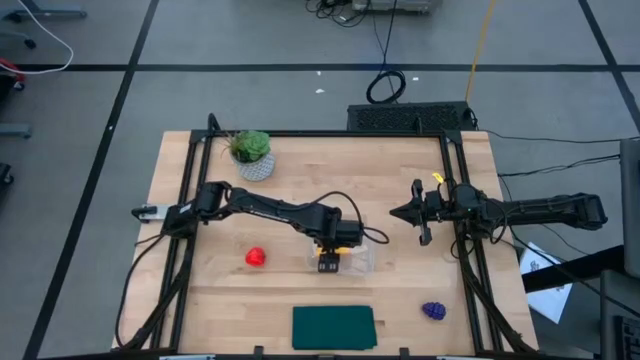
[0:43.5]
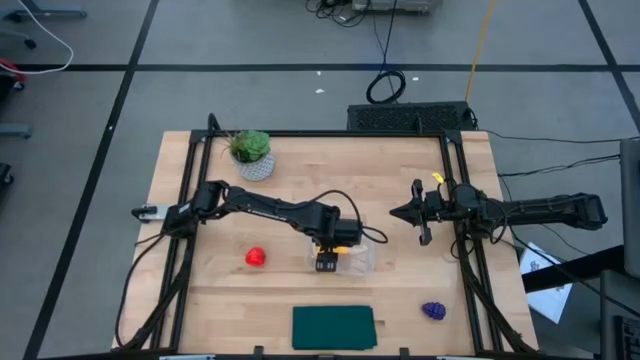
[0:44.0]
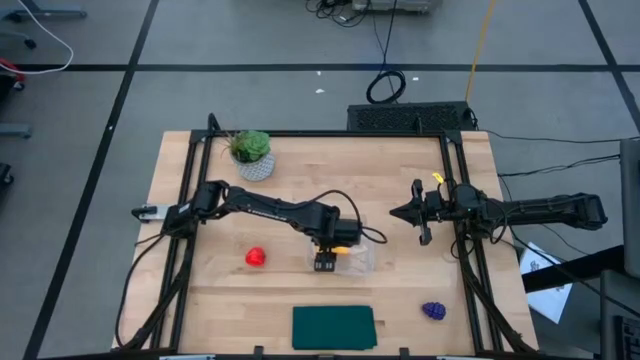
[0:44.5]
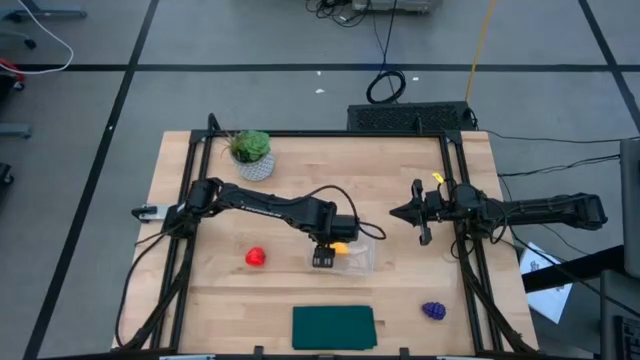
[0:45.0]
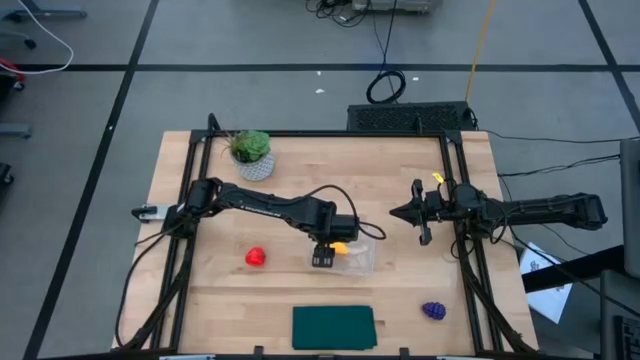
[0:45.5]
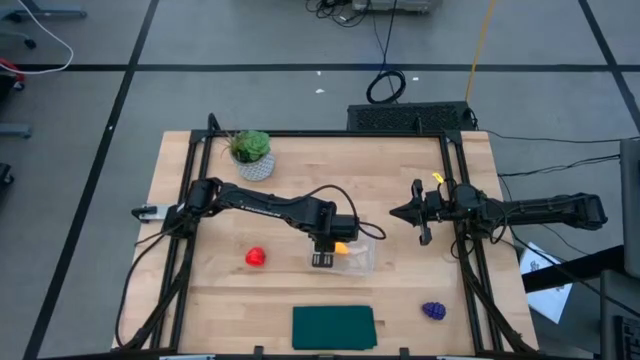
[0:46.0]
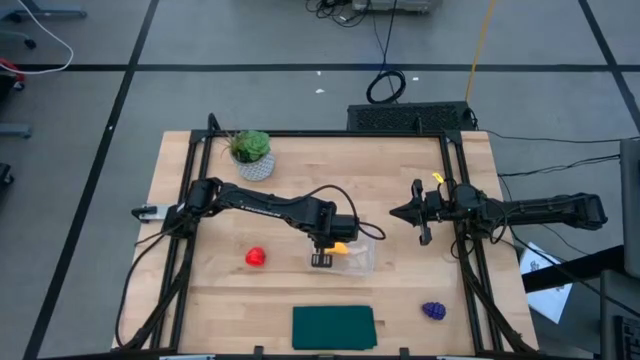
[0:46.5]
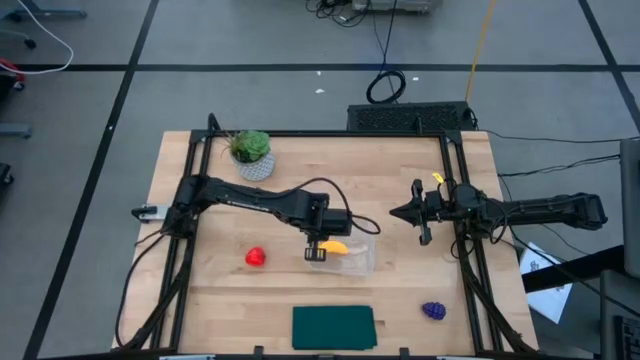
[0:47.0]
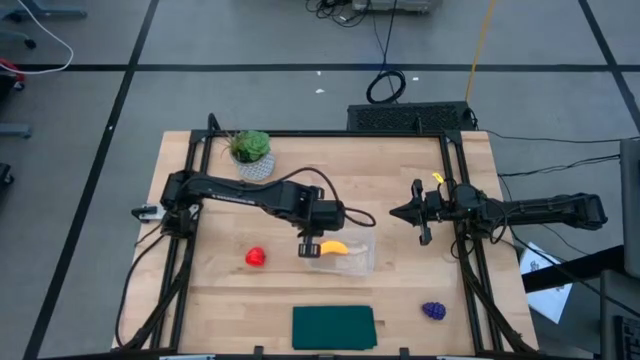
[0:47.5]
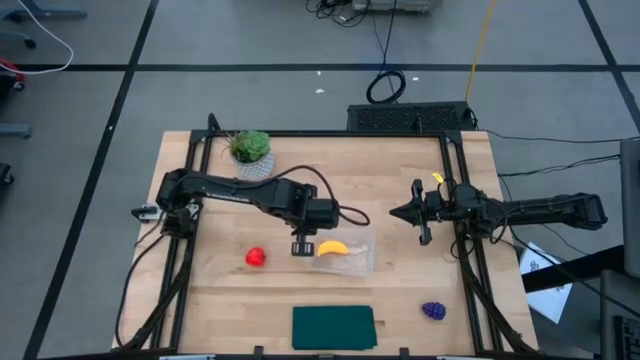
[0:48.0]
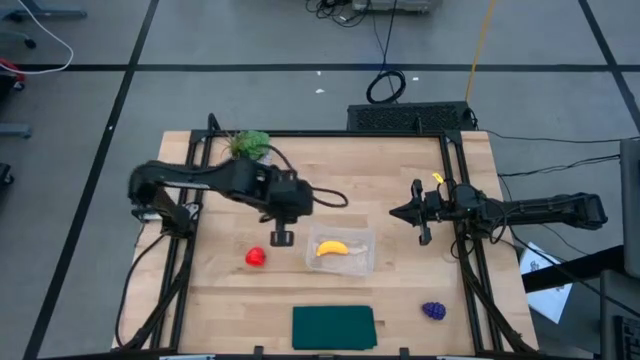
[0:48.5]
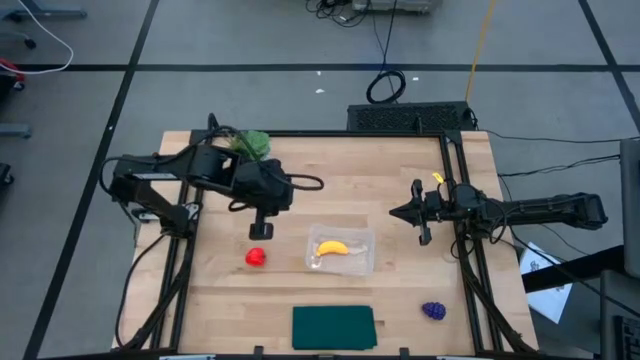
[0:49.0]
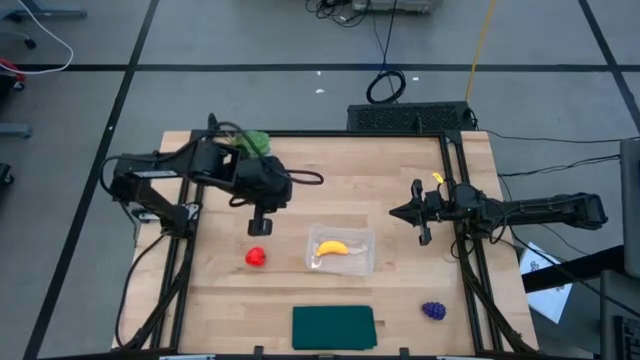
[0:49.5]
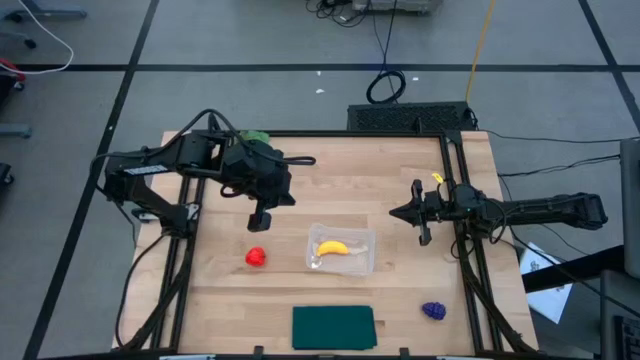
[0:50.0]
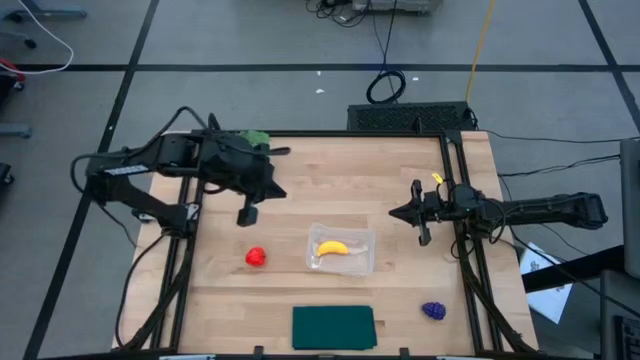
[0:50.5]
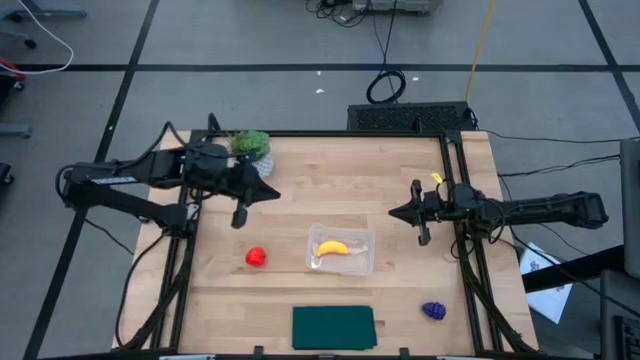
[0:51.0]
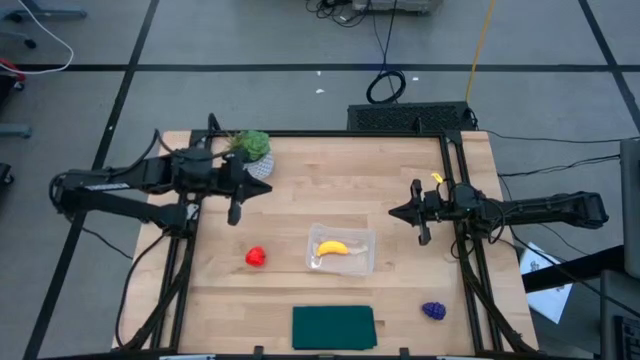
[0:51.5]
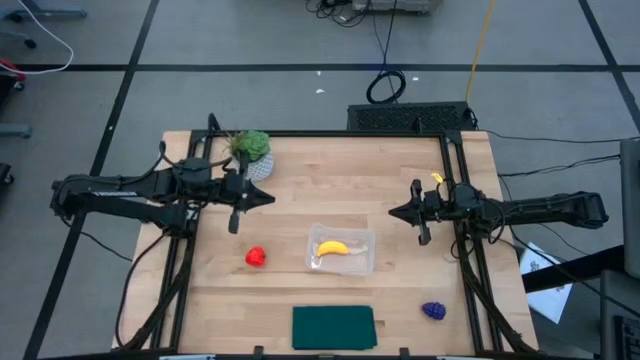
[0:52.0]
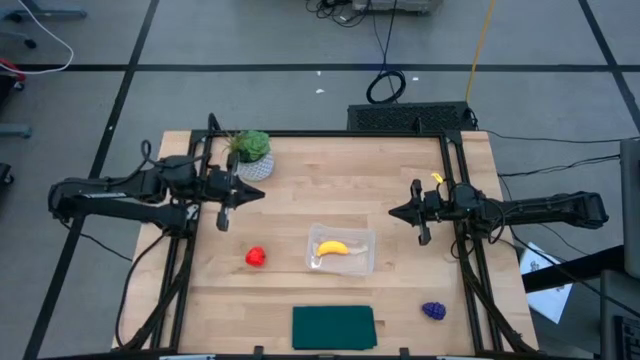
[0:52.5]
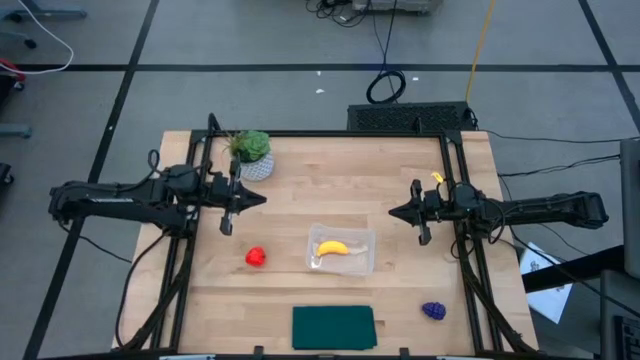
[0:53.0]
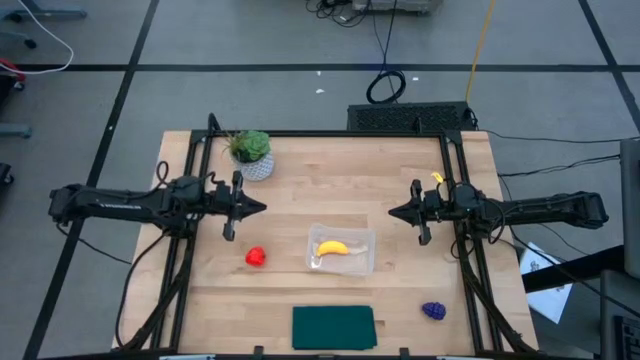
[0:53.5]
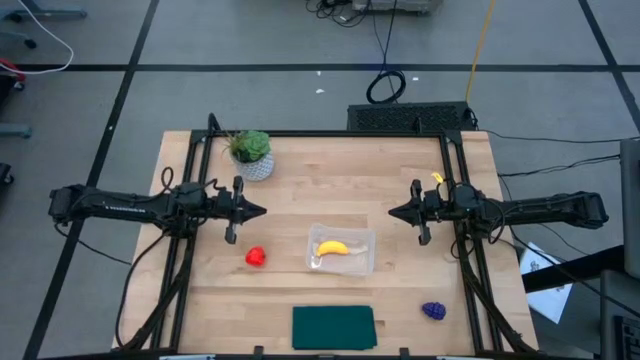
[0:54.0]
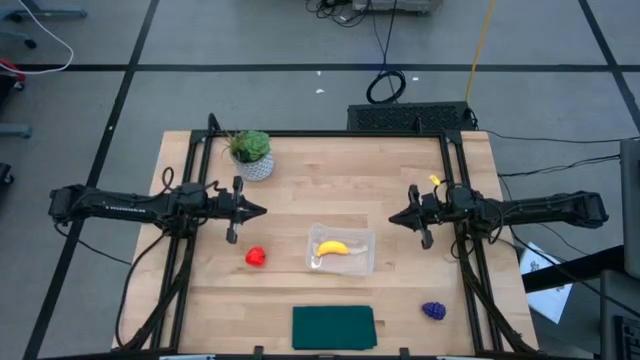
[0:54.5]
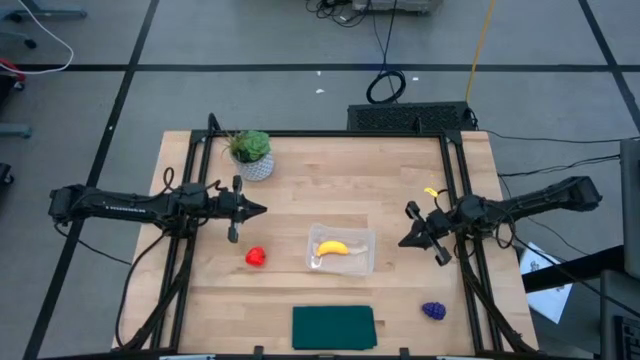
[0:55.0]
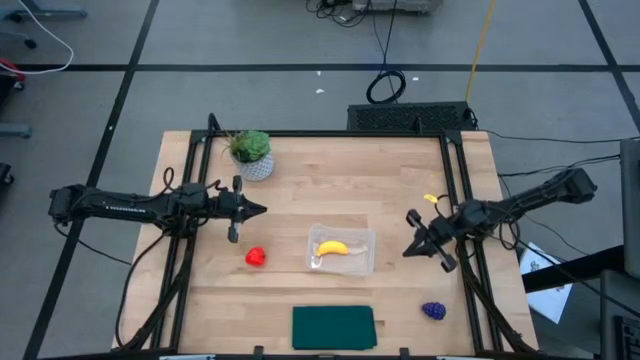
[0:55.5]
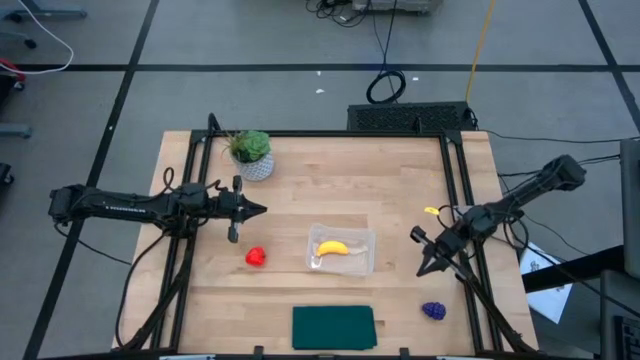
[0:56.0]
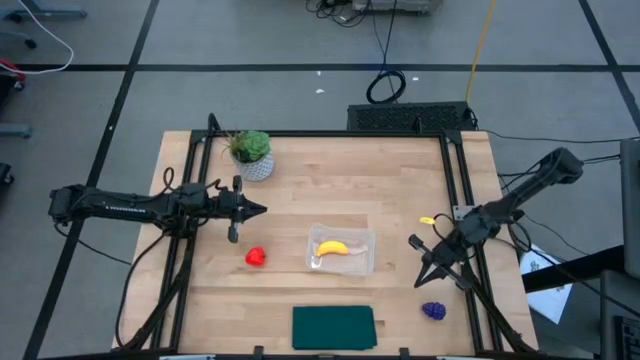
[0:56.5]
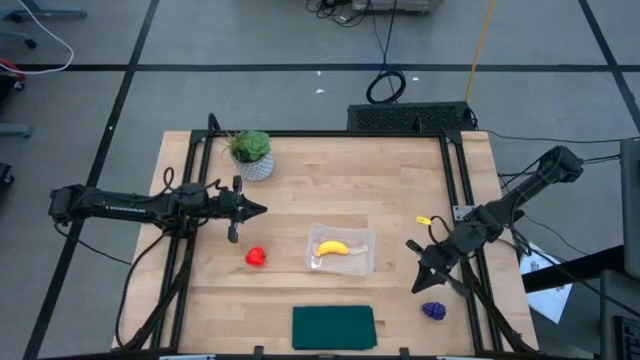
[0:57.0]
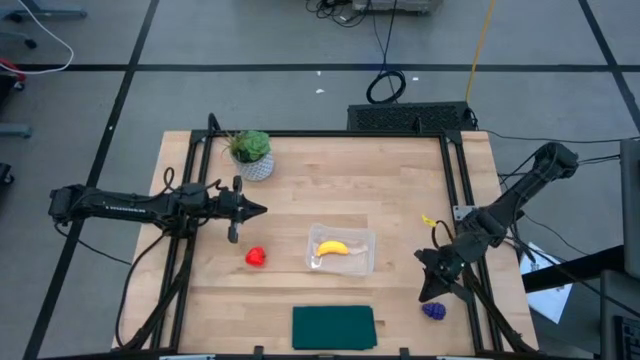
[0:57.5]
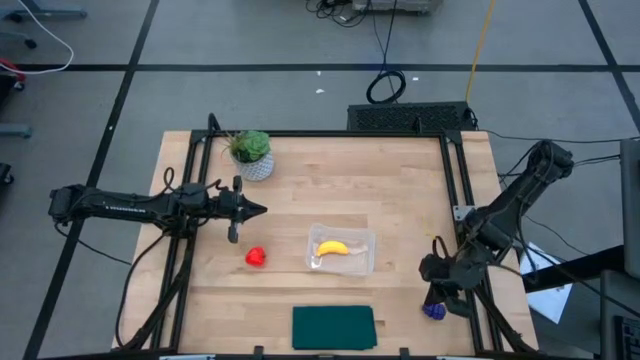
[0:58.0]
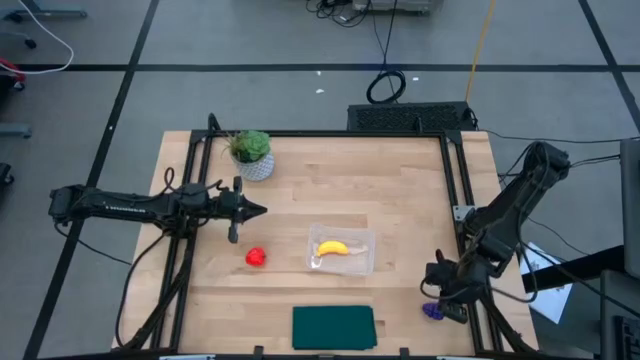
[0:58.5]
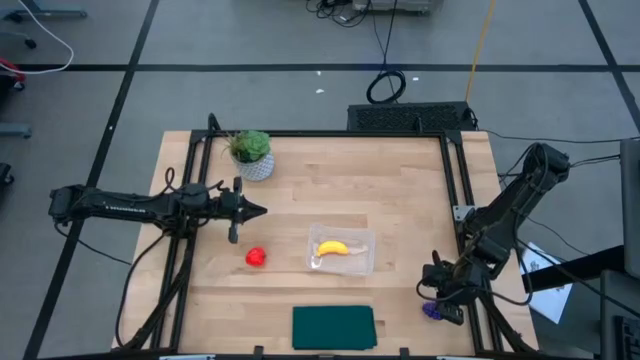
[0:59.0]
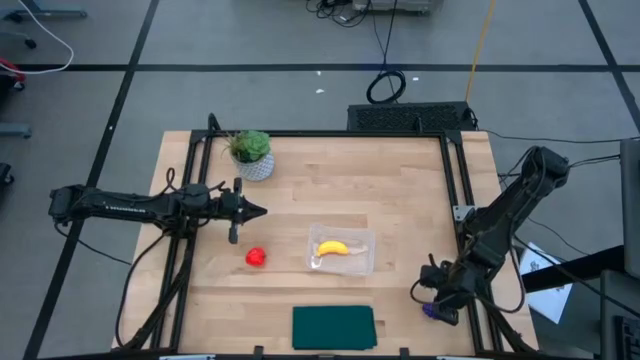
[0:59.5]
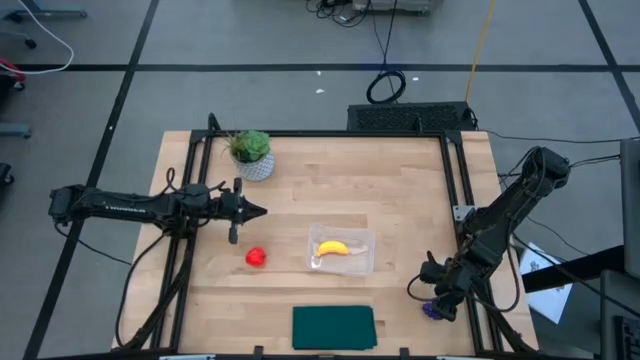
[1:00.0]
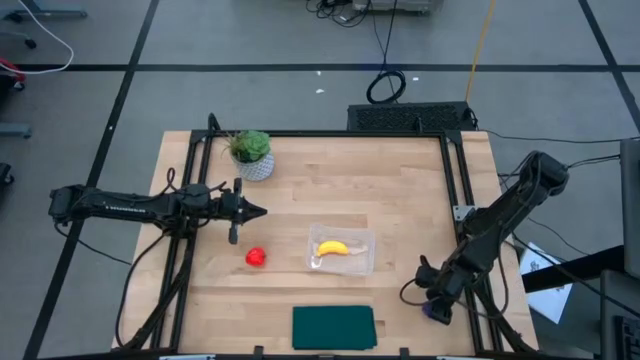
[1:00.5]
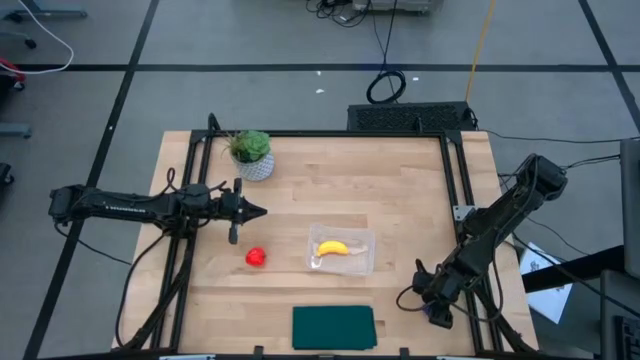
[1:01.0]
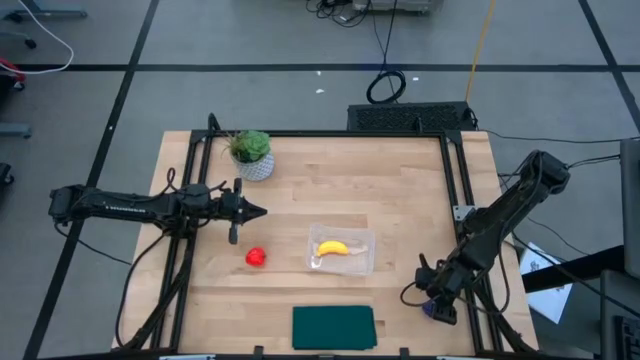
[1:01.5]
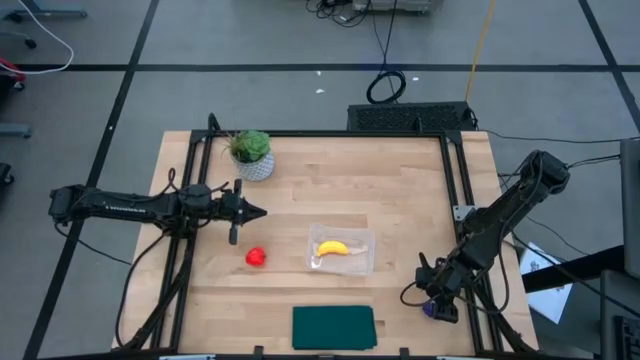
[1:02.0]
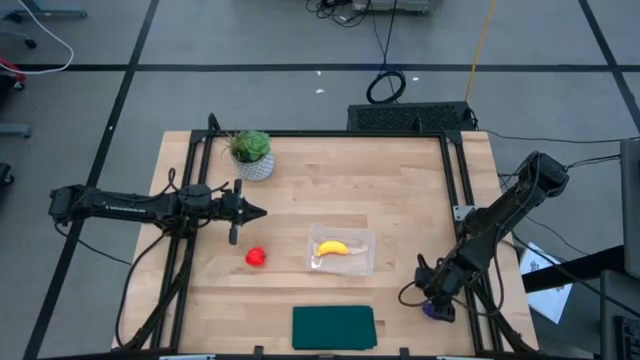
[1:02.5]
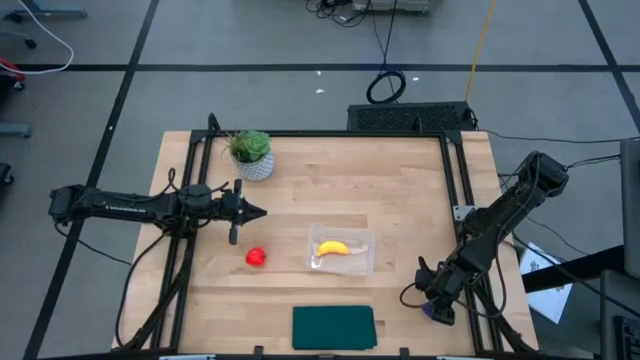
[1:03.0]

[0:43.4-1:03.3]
Task: Pick and placing Produce into tupperware
Put the grapes into the transparent bin

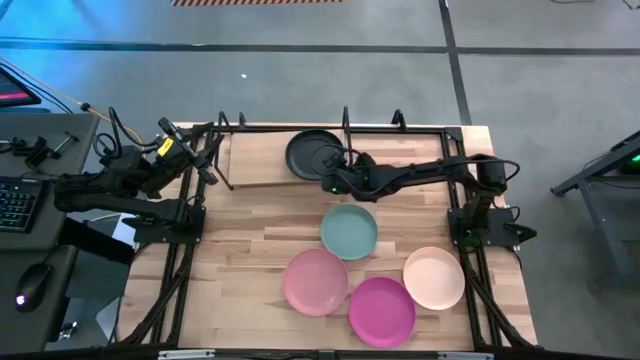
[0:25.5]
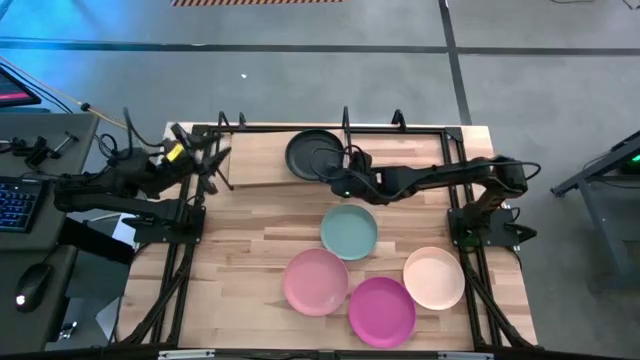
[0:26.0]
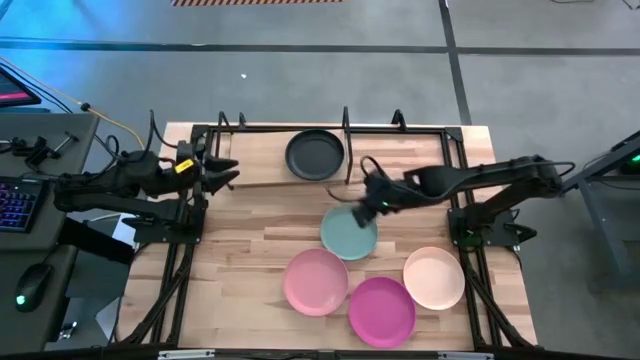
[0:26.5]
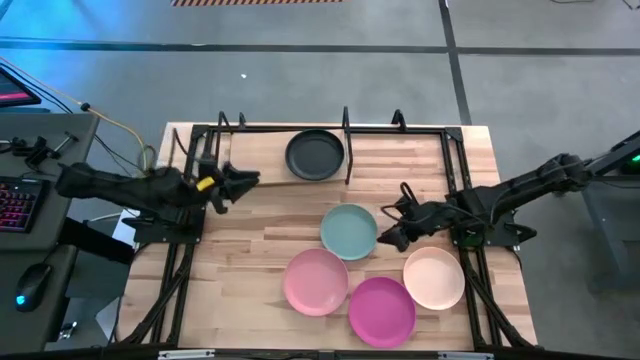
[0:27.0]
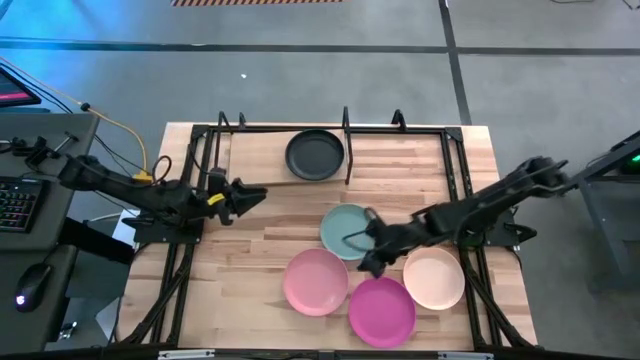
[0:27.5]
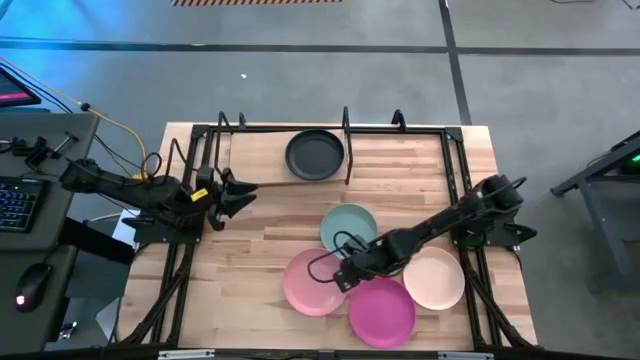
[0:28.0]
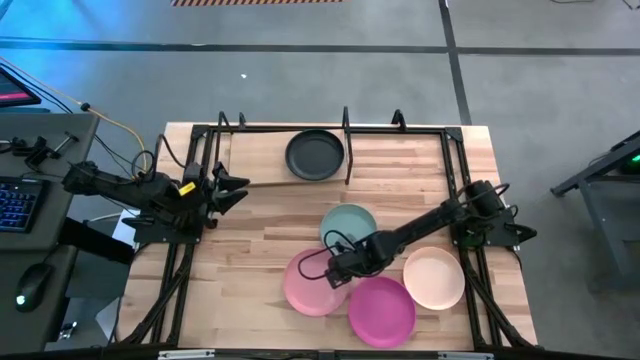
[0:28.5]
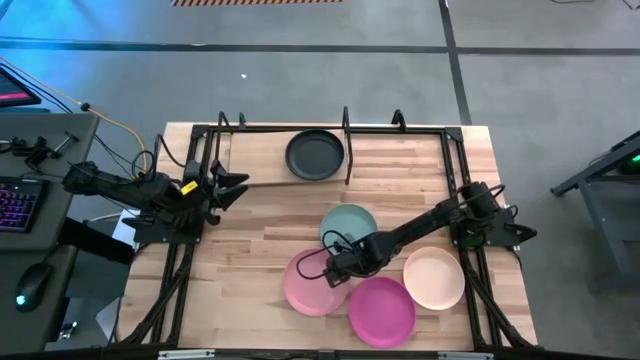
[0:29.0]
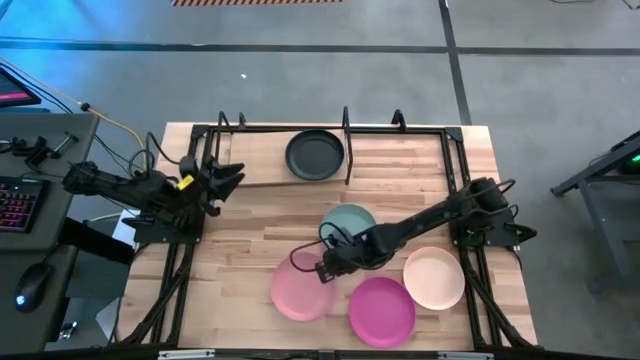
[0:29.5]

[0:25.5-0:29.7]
Task: Place and stack plates onto a shelf
Stack the light pink plate on top of the black plate on the shelf
